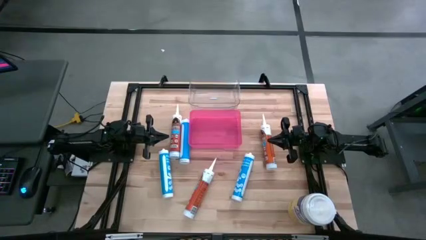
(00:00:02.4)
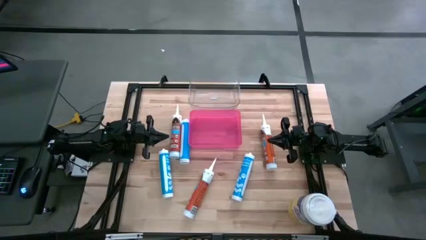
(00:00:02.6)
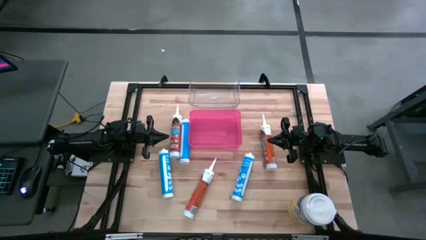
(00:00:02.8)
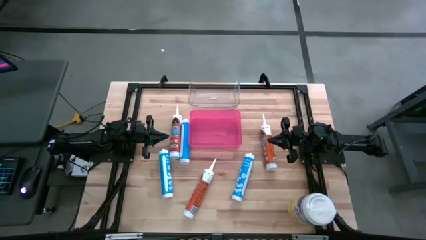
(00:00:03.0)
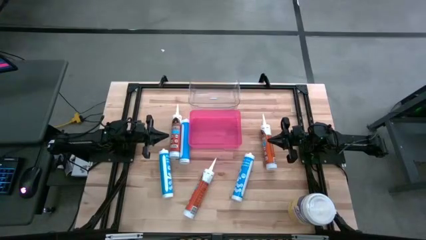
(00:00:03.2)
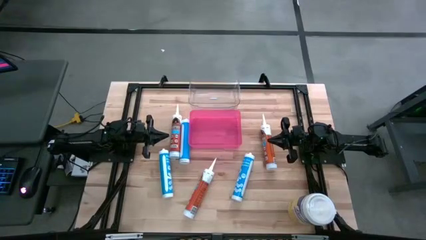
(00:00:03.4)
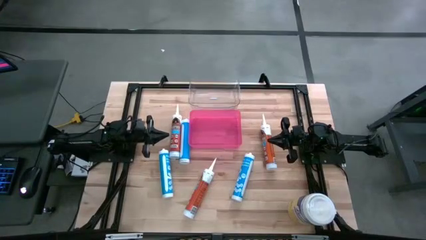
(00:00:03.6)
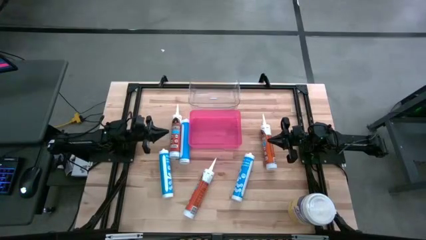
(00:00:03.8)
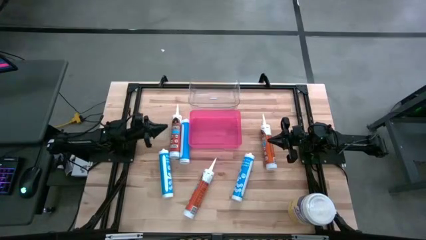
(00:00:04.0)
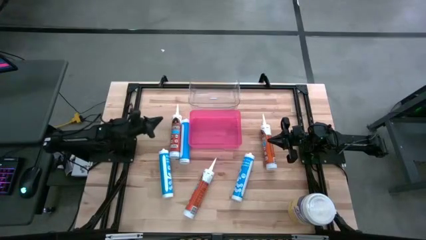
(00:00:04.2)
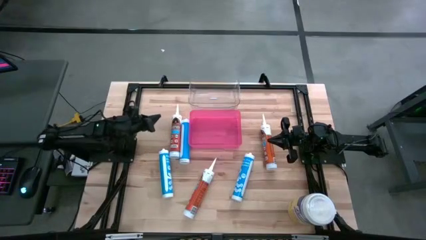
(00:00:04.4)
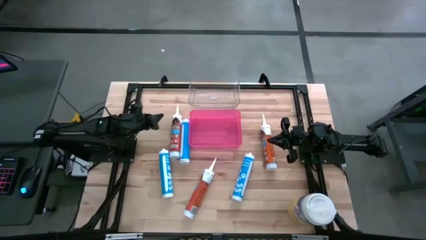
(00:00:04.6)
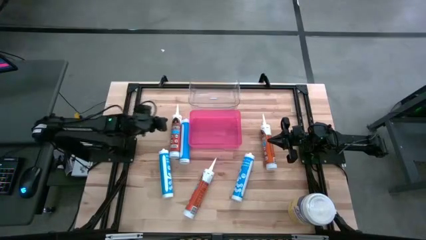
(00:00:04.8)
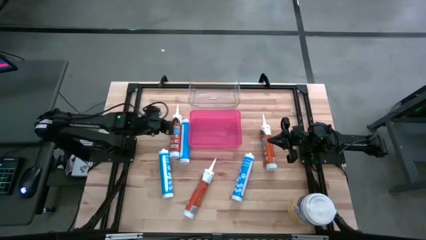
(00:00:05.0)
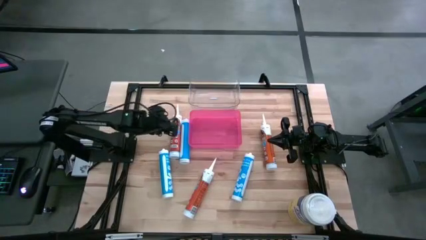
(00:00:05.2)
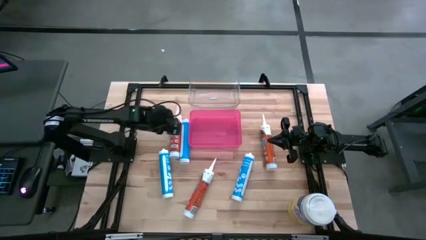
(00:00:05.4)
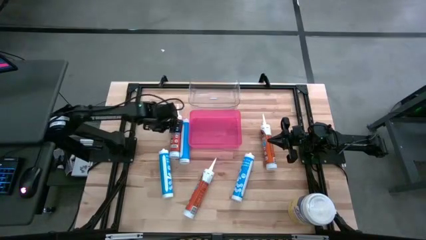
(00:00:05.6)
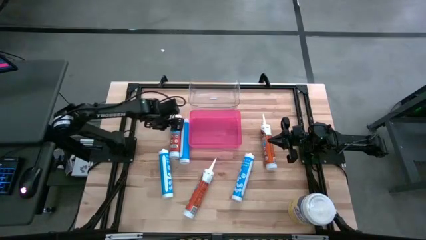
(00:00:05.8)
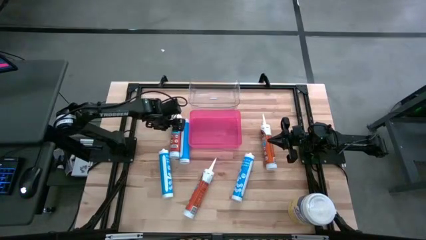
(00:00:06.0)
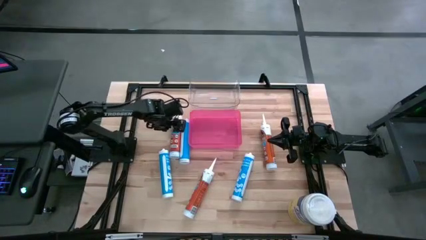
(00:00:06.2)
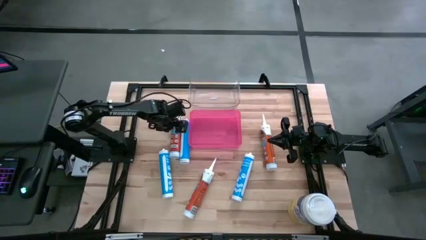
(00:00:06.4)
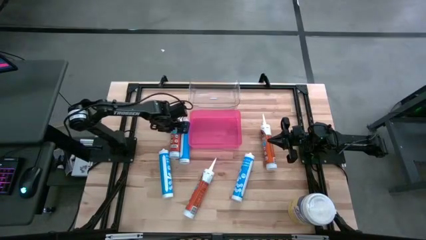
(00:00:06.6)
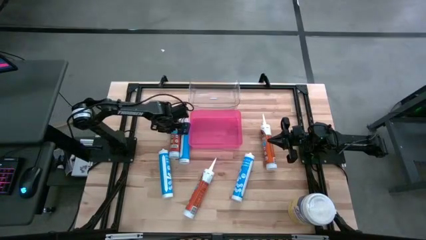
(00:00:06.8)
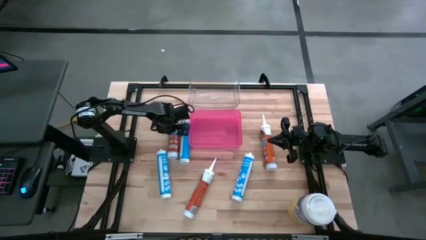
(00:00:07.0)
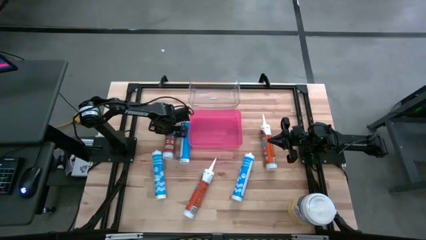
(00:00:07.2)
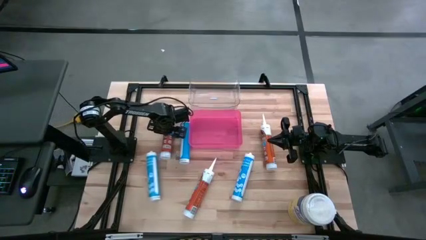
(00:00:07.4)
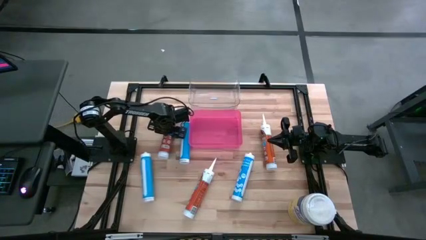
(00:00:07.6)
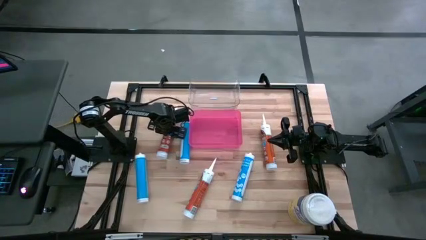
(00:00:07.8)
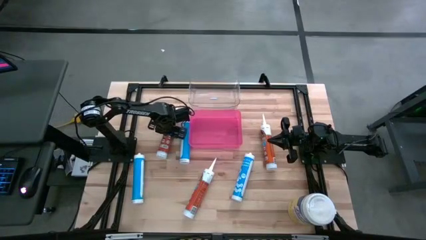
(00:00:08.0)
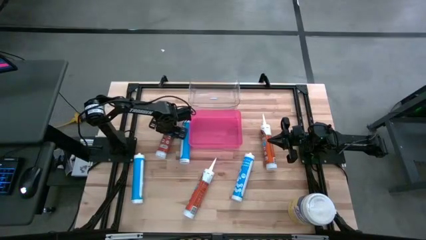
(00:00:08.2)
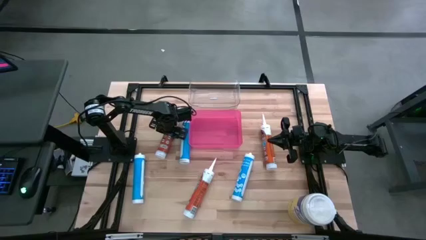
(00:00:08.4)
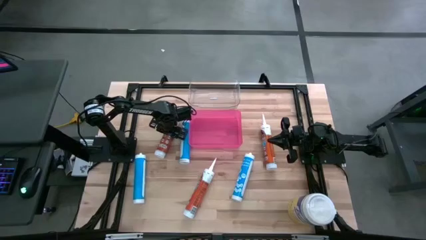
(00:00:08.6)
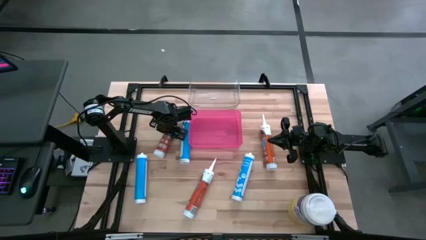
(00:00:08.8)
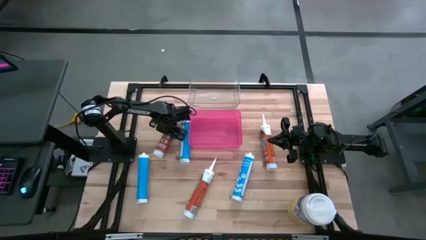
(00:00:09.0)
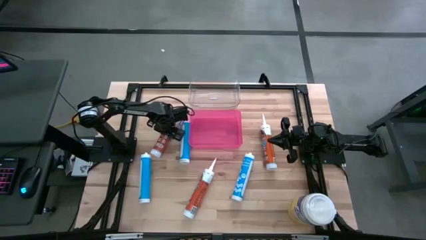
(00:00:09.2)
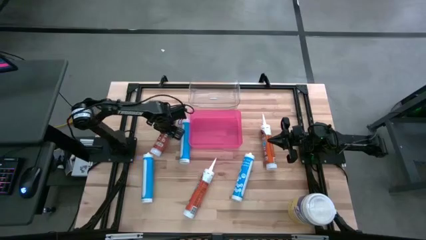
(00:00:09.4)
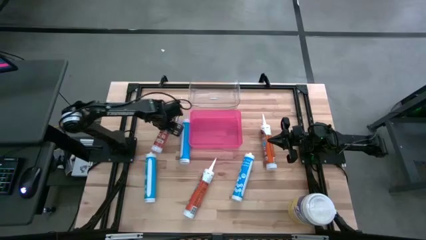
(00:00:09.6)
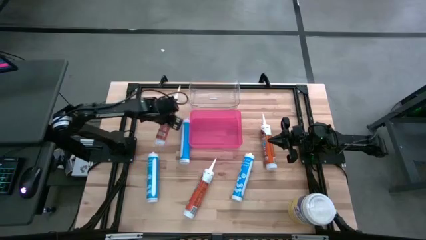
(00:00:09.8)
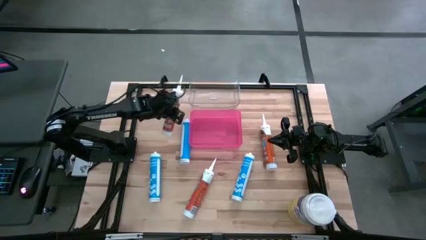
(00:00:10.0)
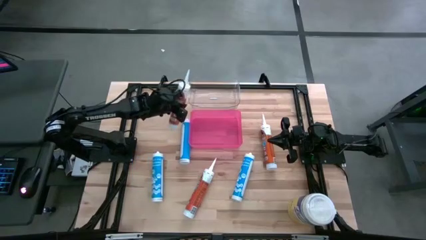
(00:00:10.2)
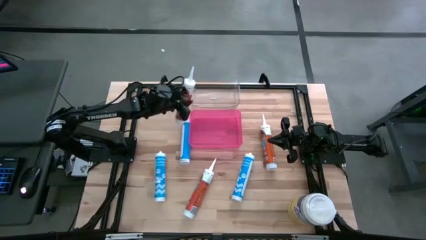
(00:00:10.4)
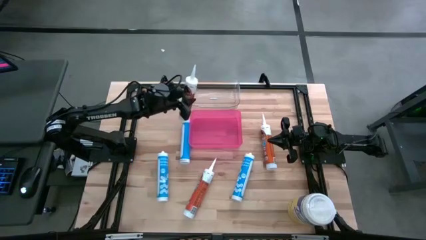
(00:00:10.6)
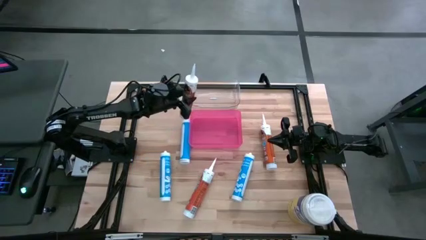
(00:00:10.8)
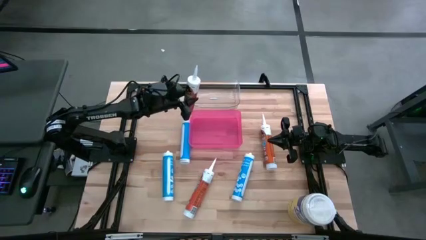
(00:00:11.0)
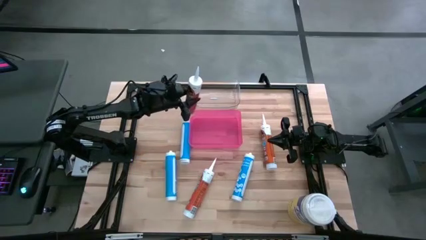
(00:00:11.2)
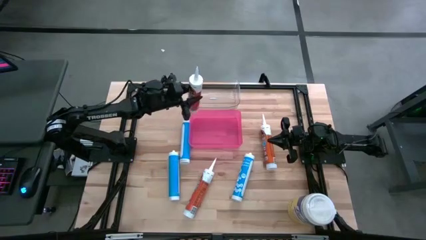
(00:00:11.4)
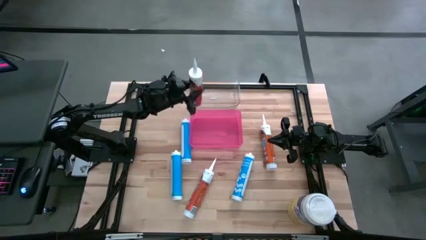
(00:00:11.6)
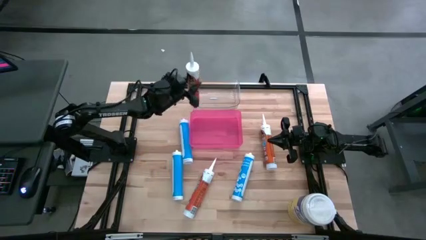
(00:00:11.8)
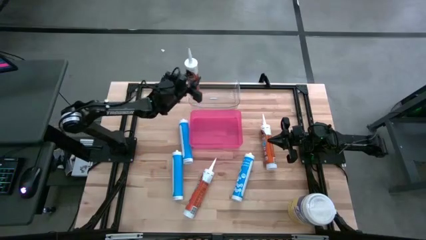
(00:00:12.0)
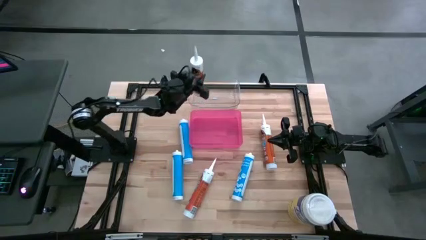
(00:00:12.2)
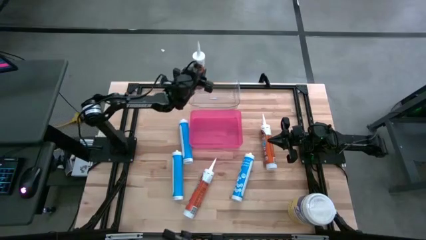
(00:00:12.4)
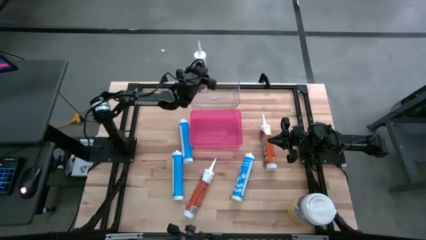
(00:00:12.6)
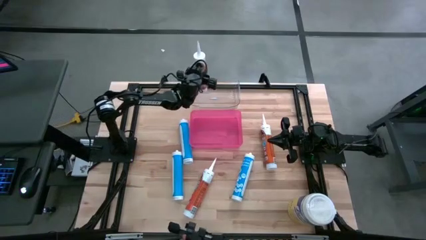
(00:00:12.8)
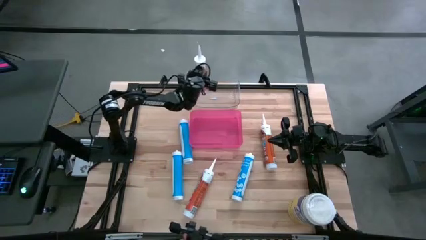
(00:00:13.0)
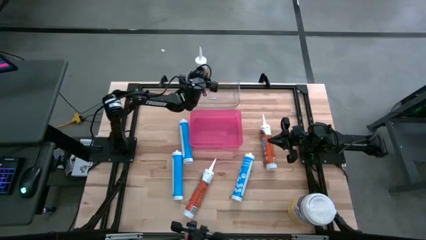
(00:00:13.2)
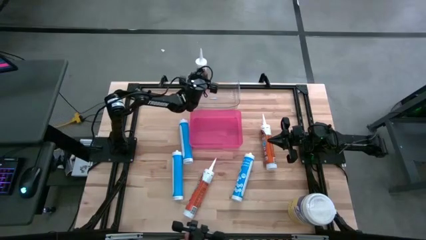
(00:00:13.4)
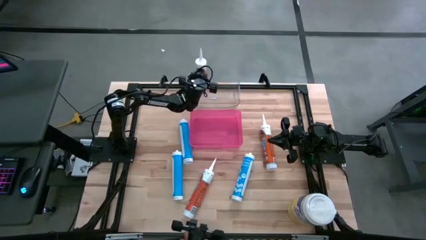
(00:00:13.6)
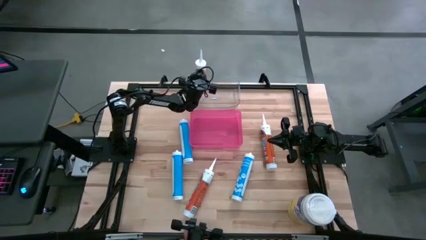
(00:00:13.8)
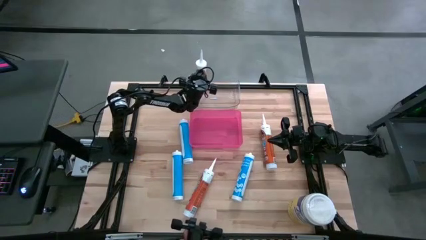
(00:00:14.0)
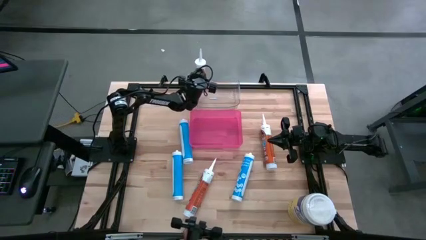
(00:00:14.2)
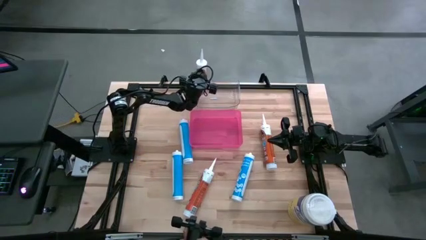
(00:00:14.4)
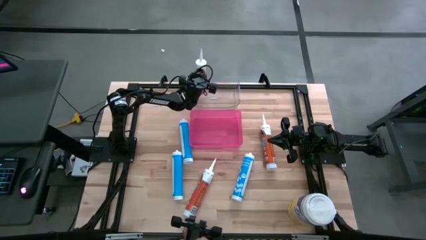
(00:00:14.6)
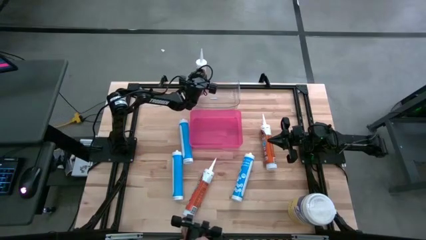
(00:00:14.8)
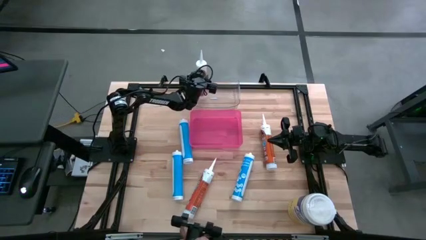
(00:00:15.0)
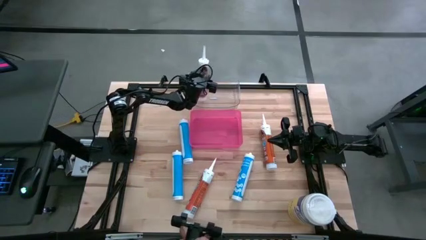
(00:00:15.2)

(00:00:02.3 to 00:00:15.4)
Task: Pick & place silicon tubes, Sealant and Lysol wipes
Put the top left orange sealant into the transparent bin
